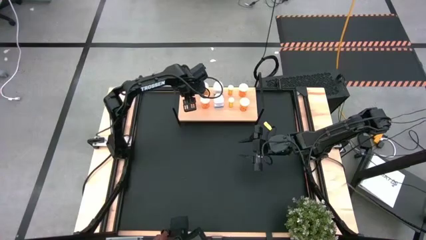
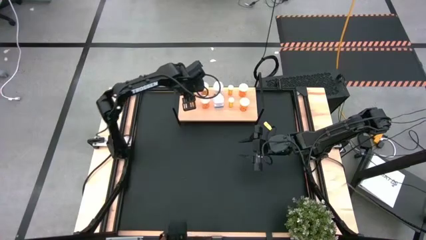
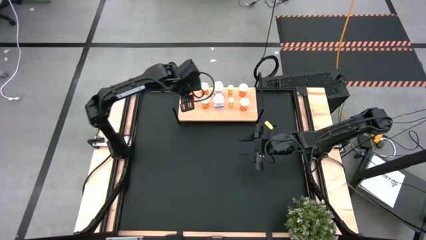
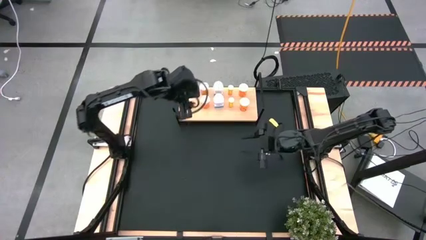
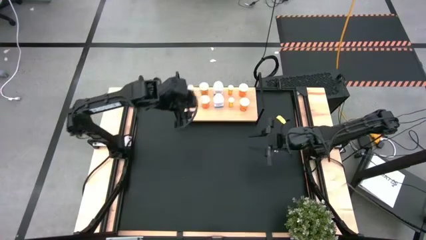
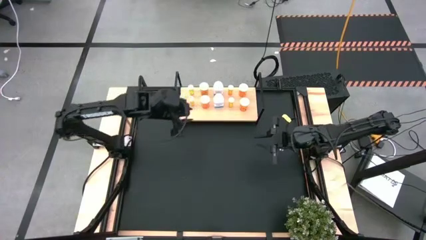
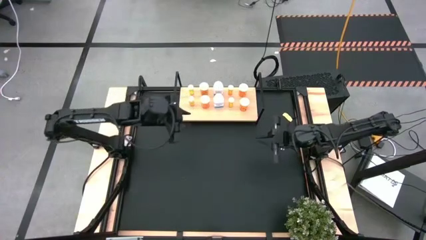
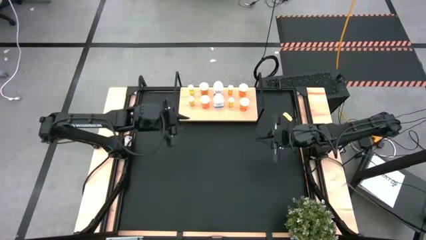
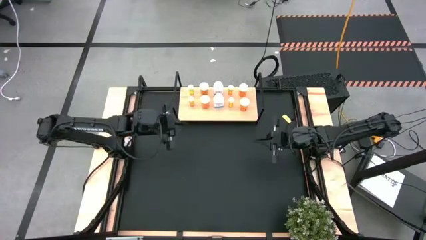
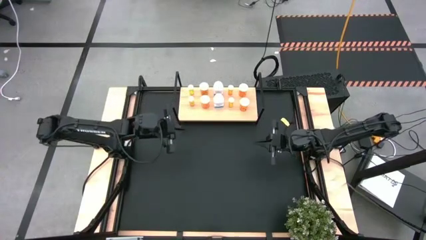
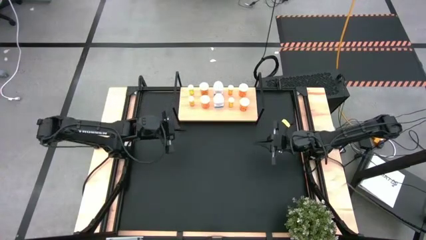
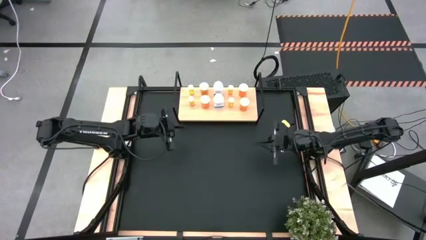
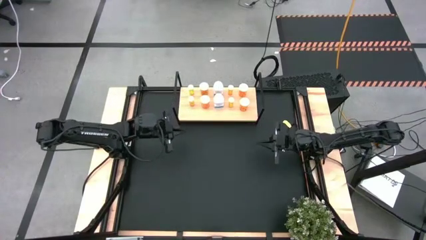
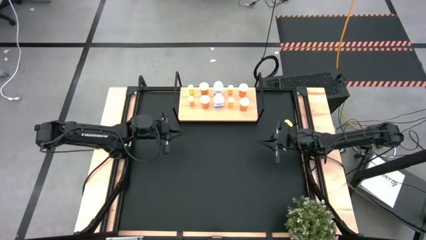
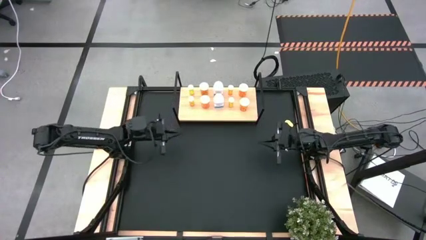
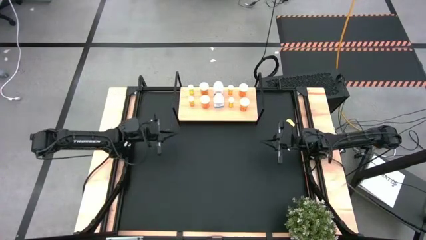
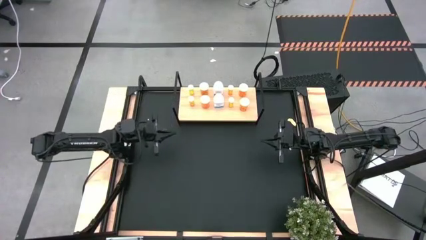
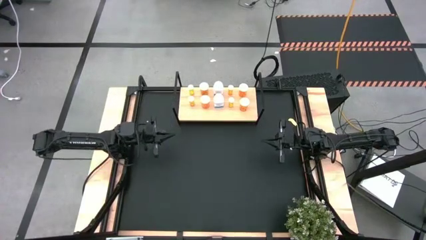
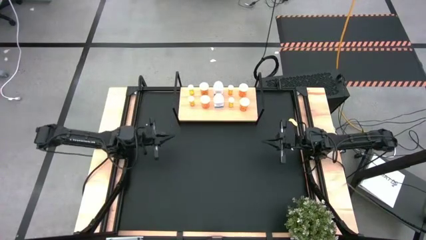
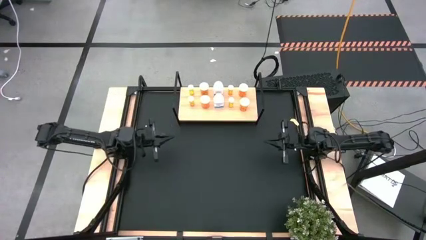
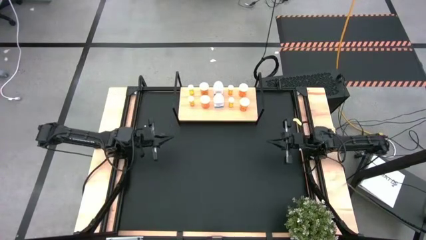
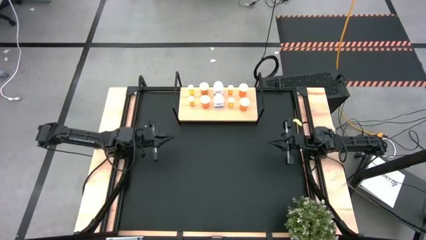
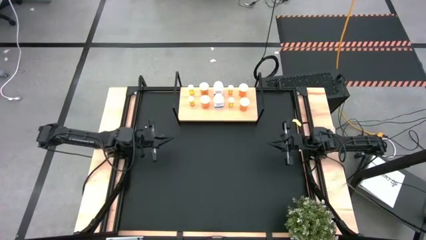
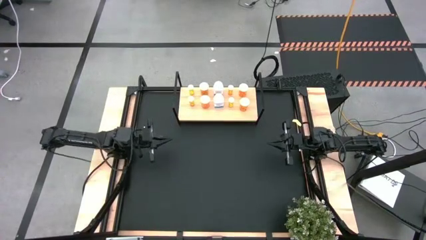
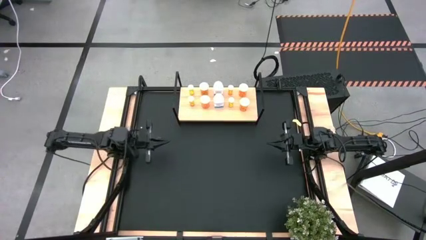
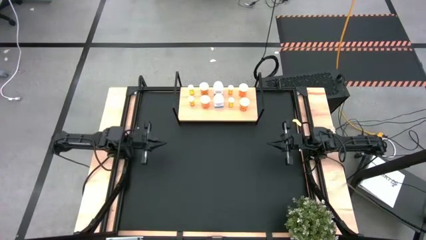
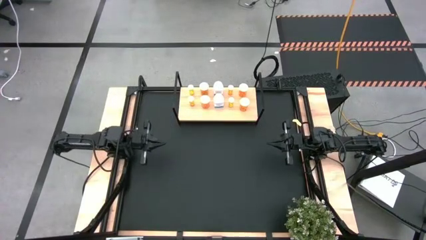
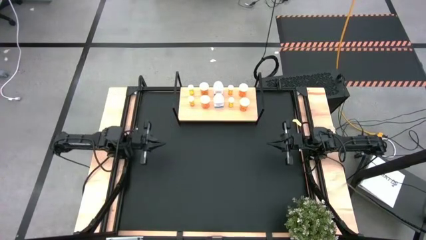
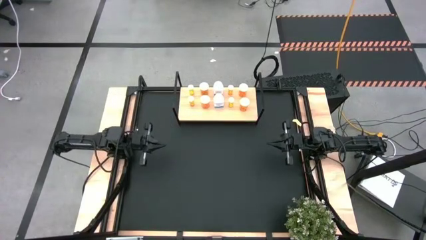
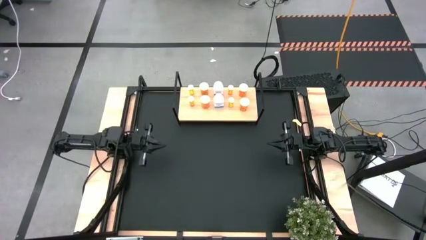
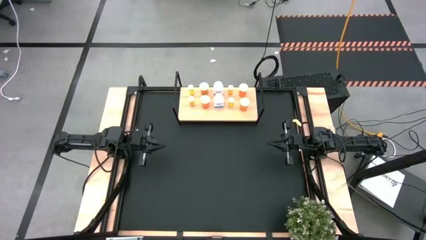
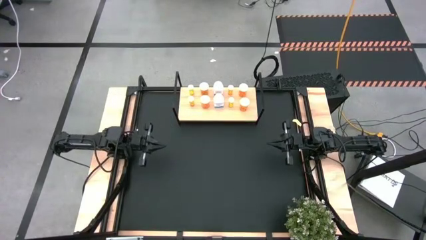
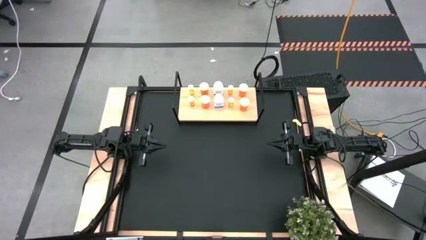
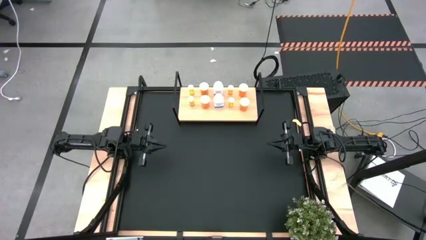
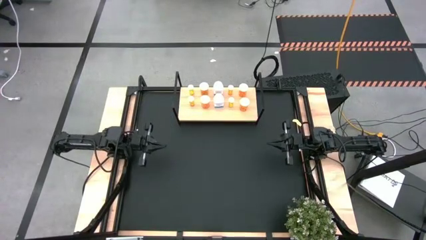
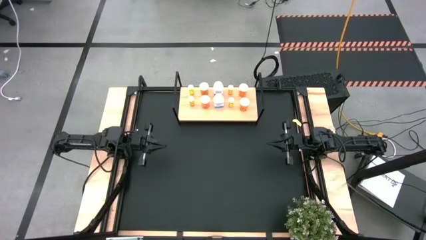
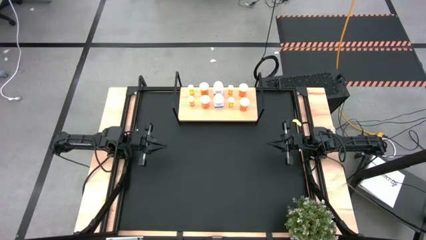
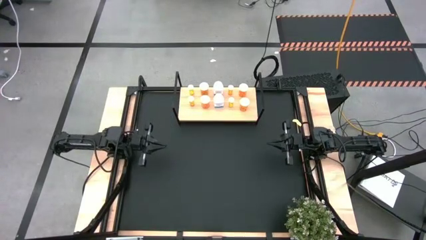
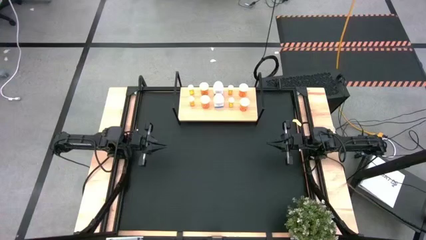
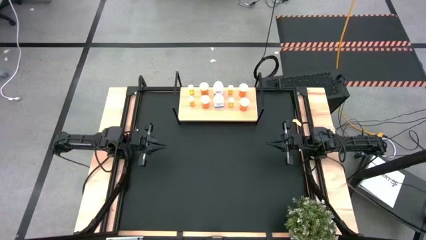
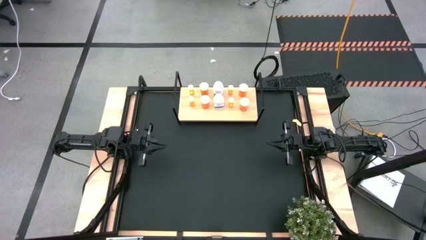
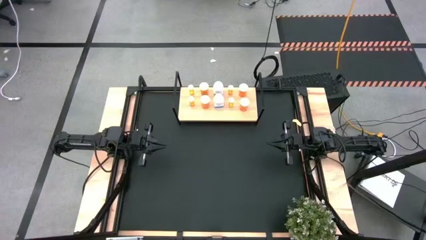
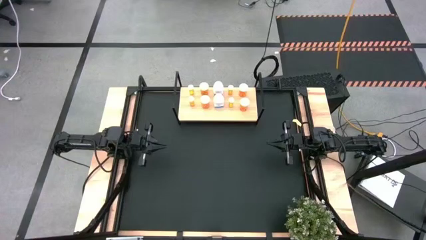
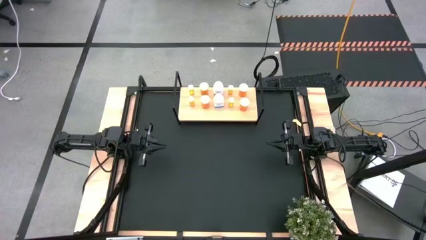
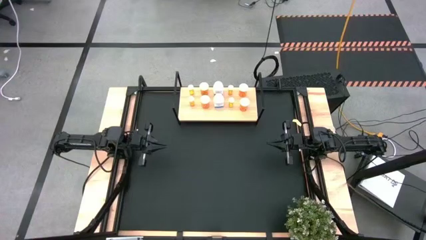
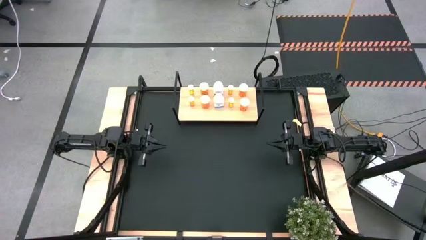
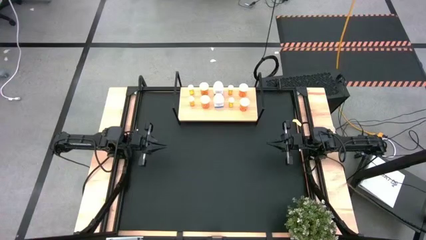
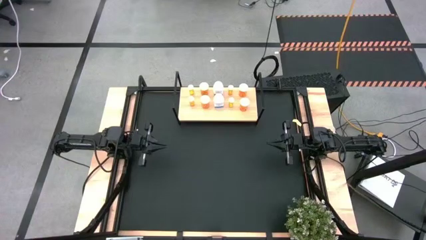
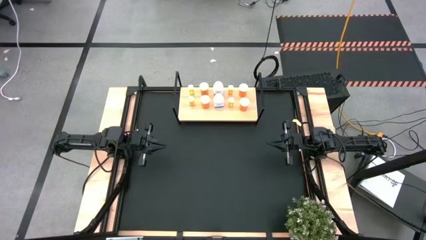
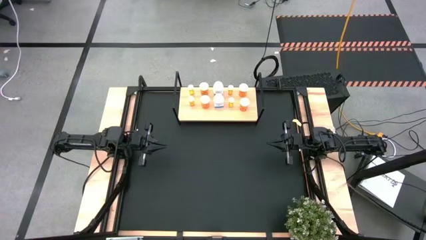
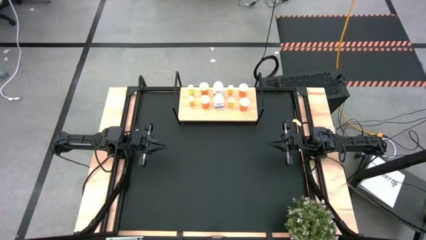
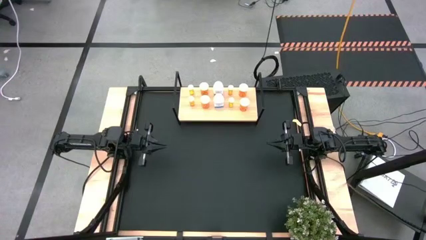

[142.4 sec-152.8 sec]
Task: Pick and place medicine bottles onto shelf by color
Return to Home Position

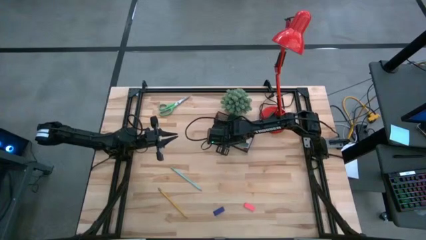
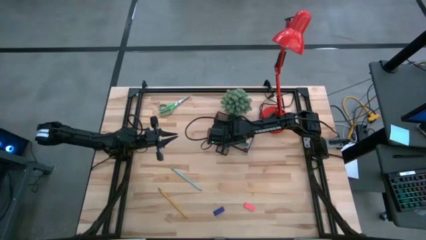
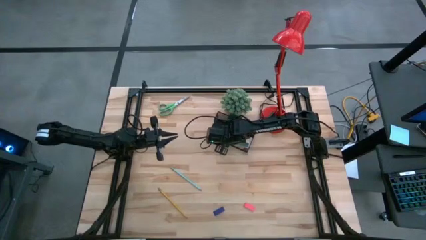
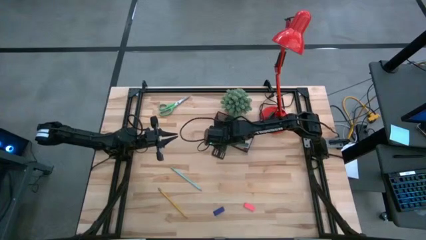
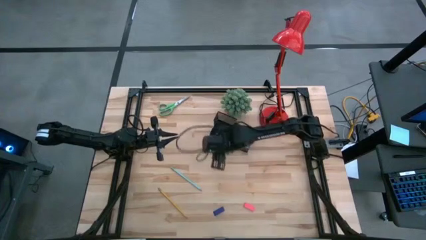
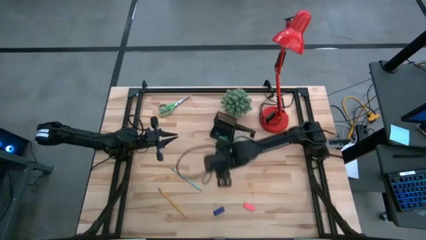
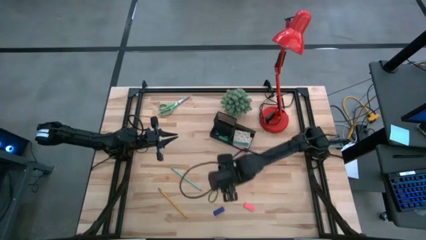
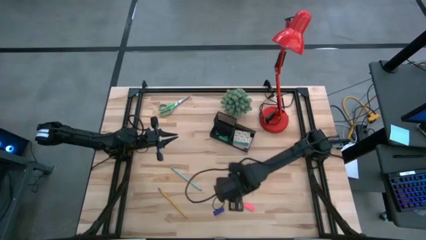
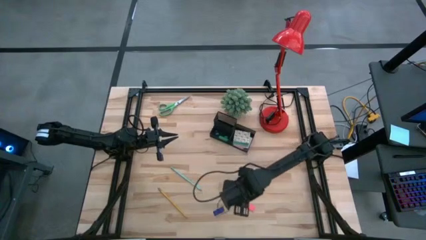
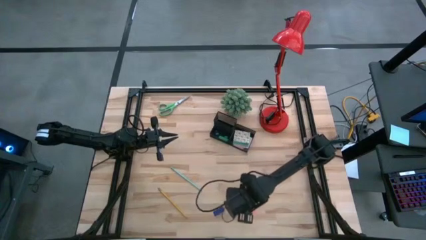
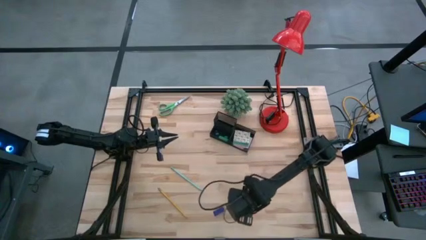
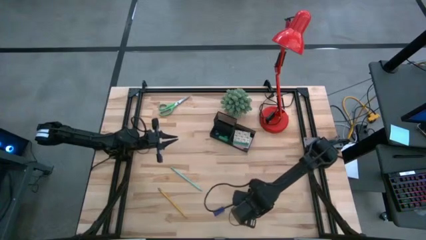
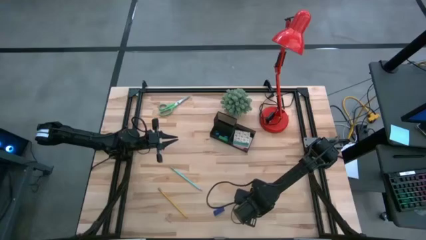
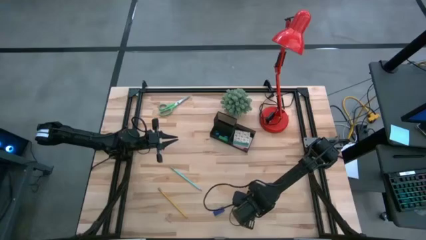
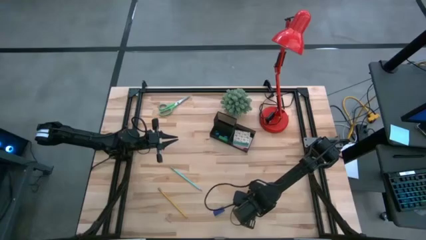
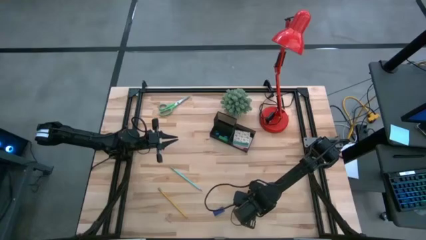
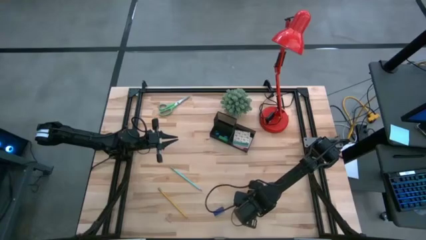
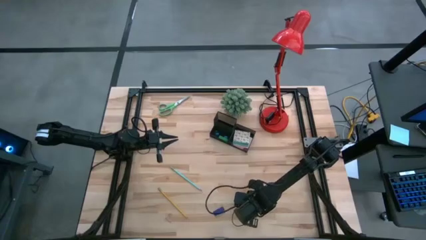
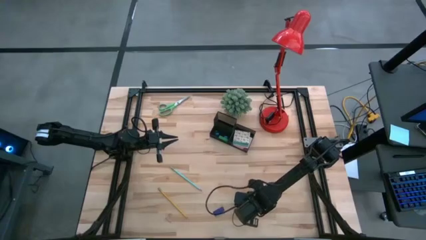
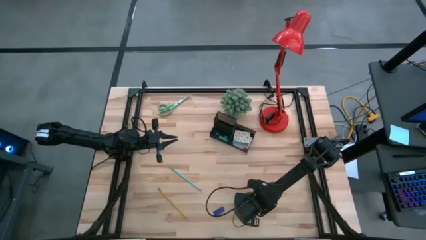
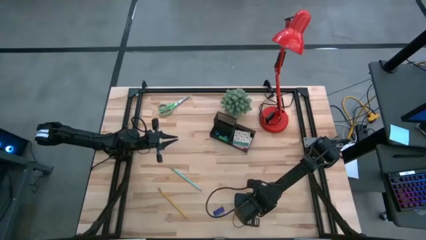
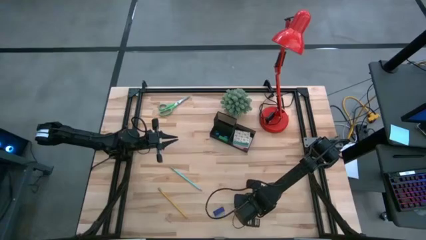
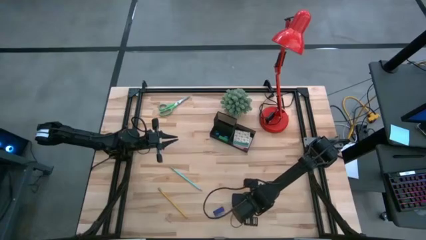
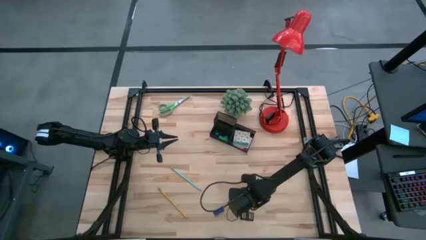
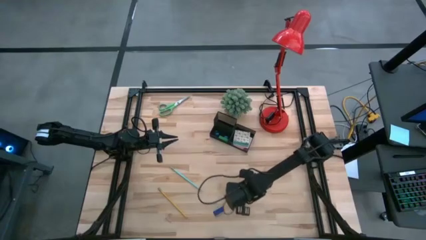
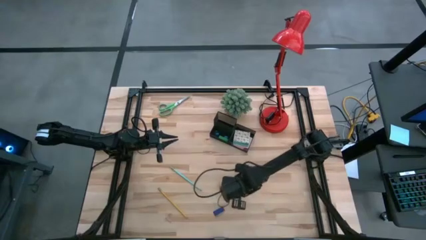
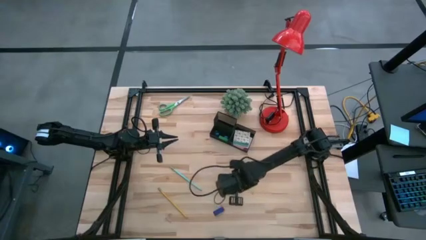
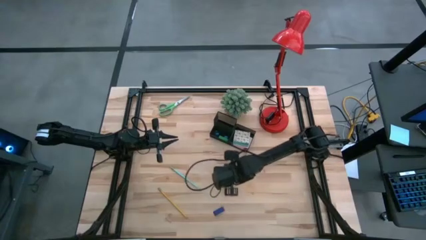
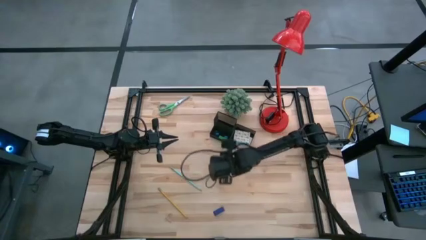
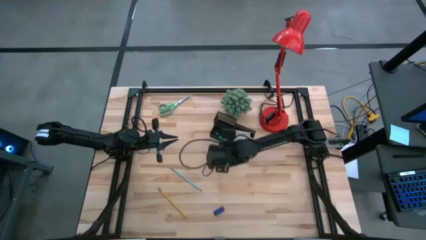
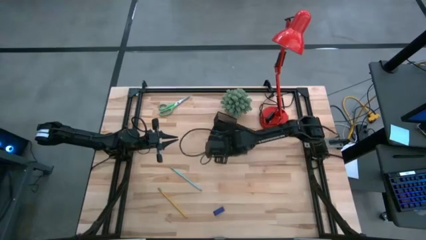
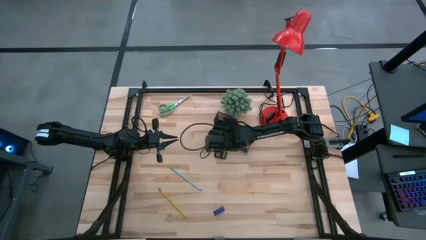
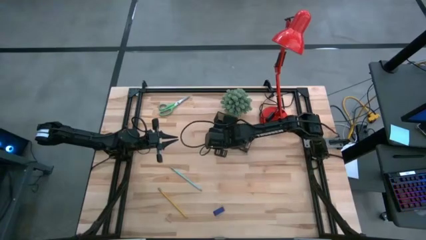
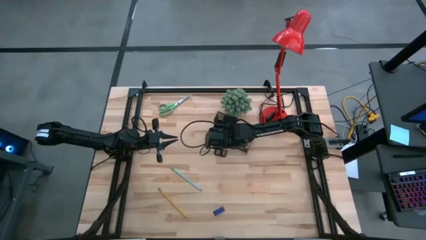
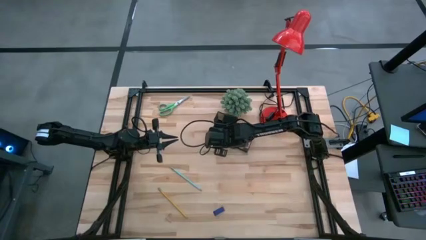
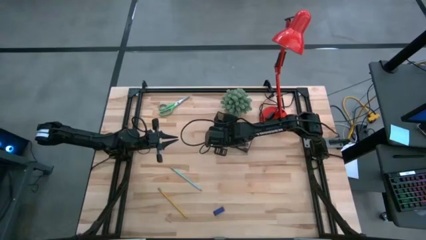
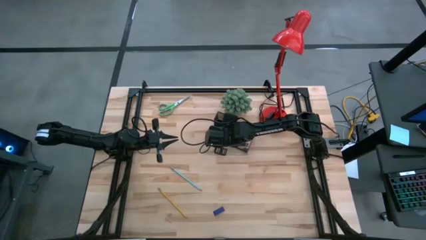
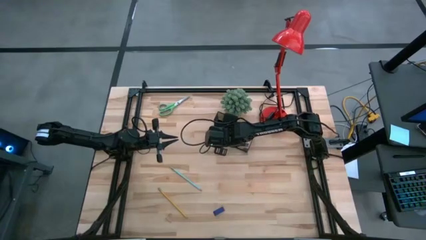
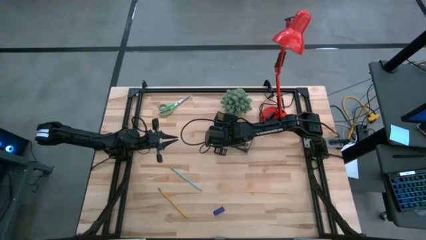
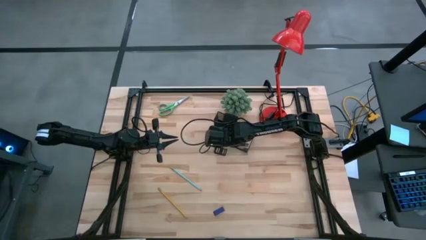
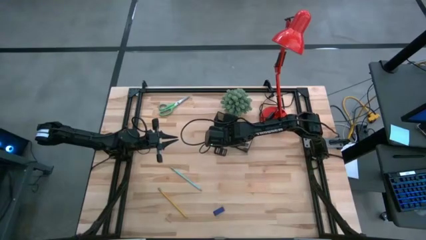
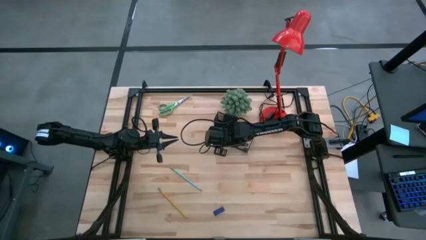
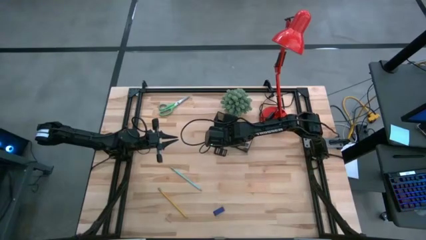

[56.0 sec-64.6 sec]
Task: Pick and place office supplies into organizer
Put the pink eraser into the black desk organizer
